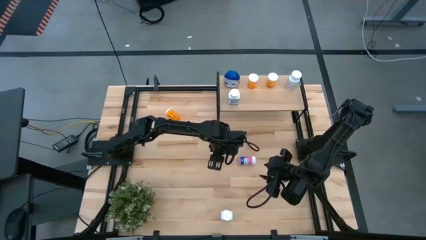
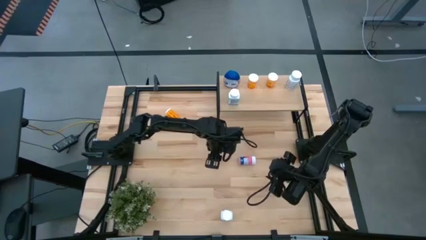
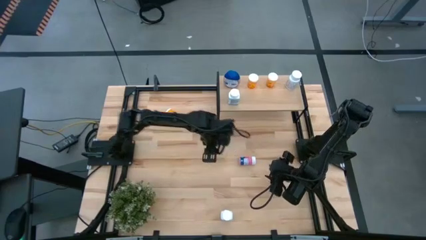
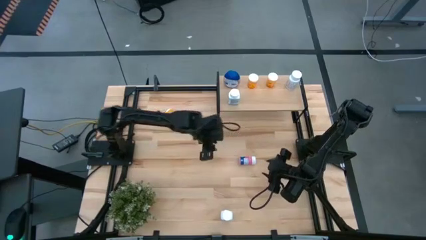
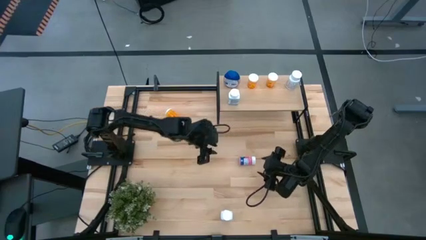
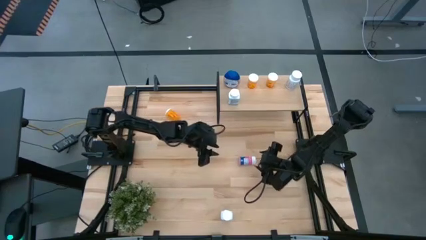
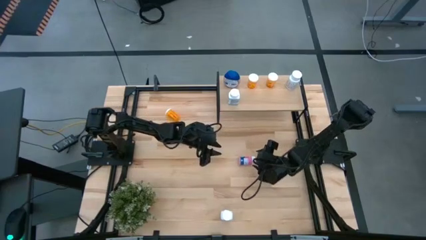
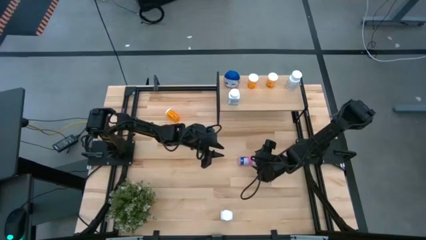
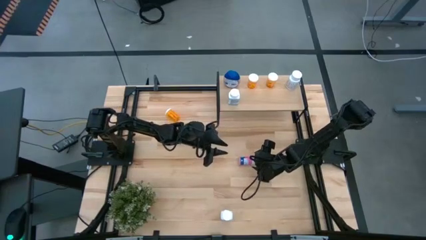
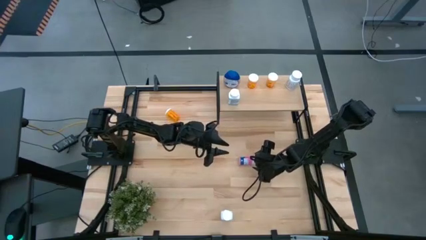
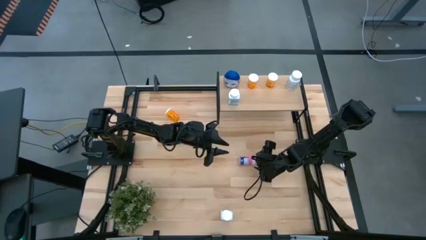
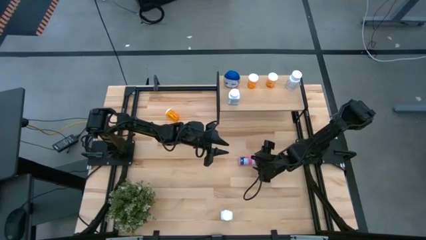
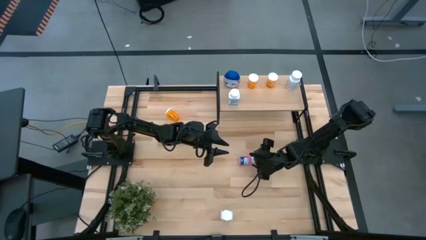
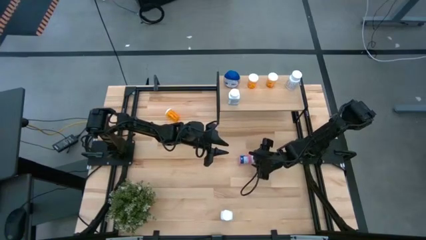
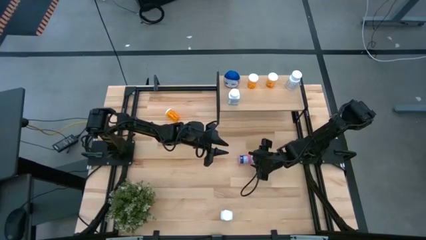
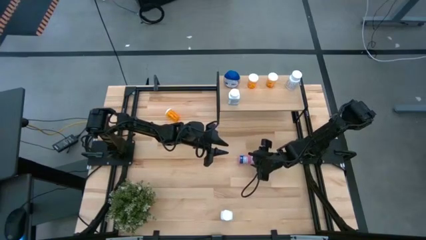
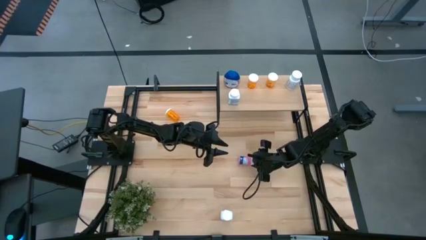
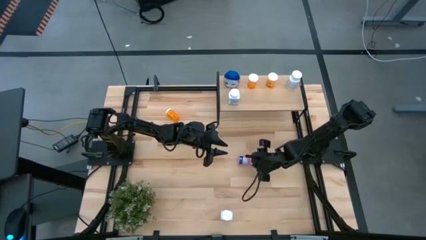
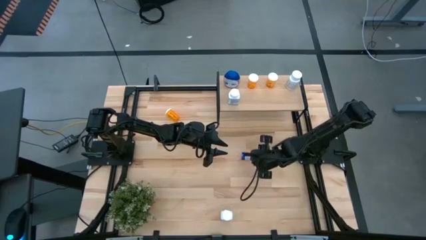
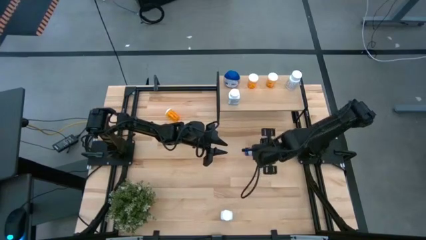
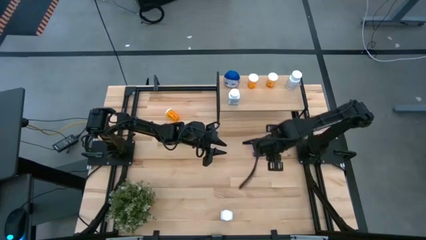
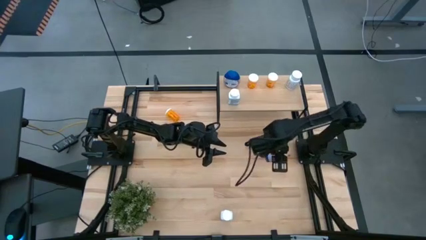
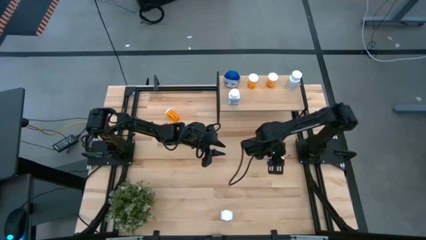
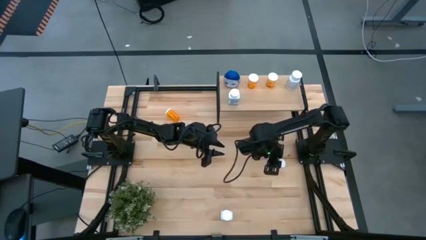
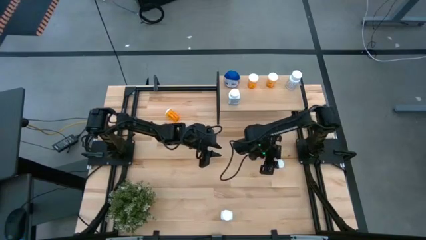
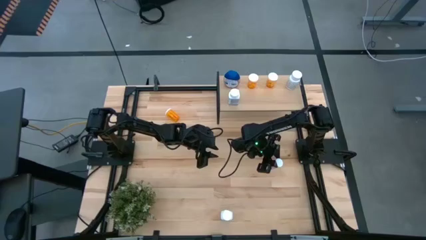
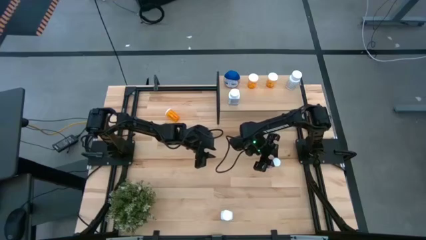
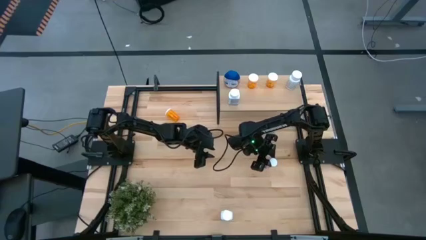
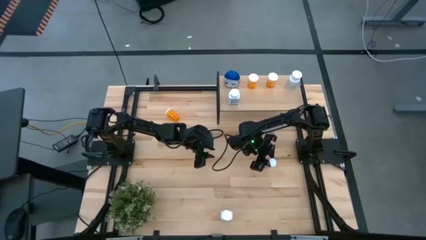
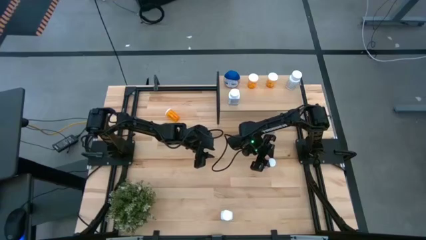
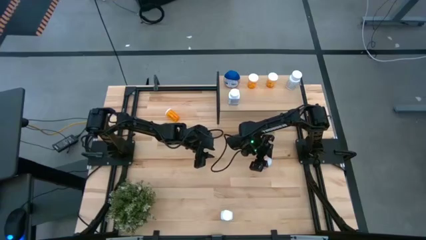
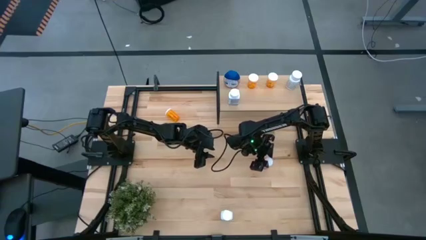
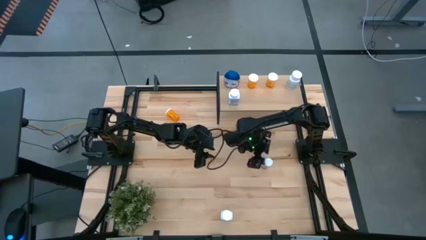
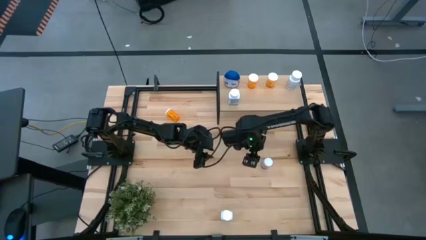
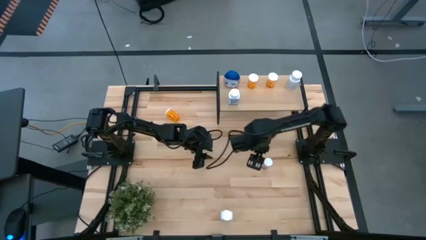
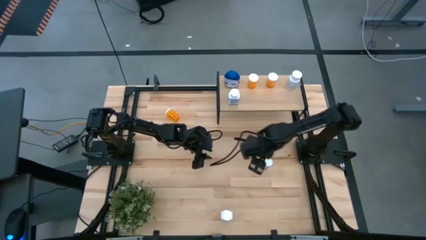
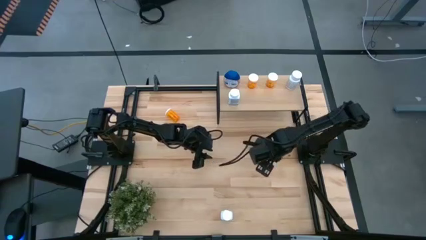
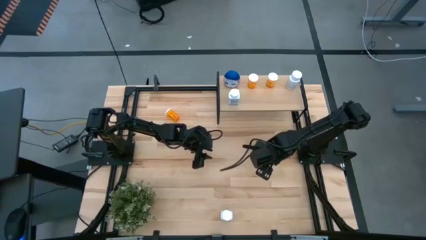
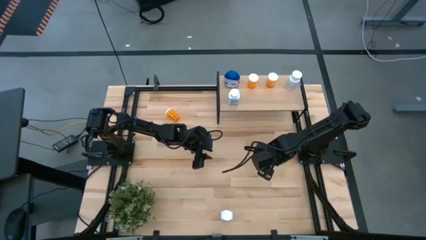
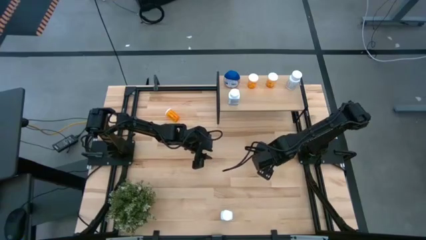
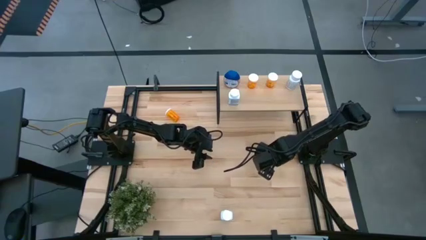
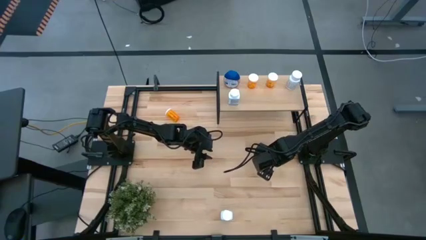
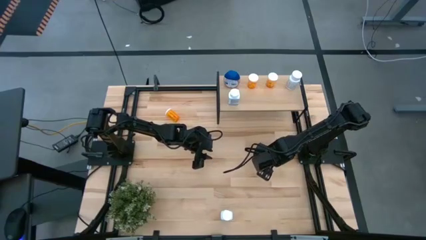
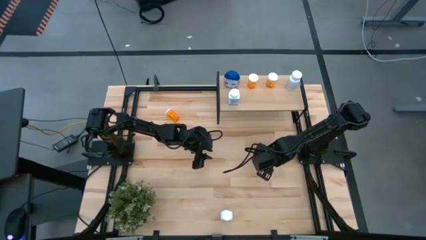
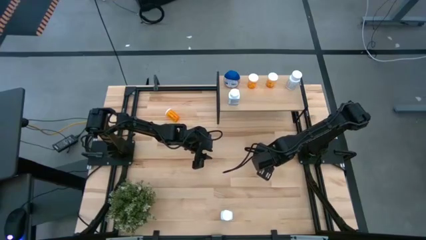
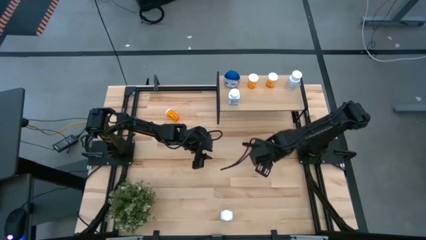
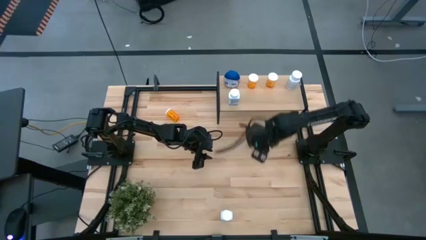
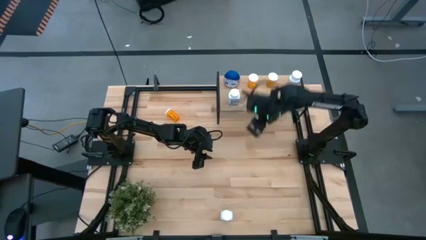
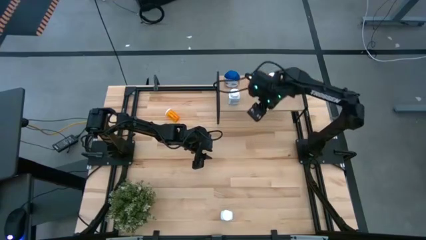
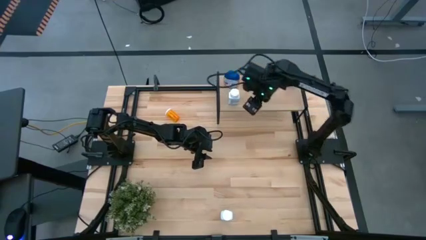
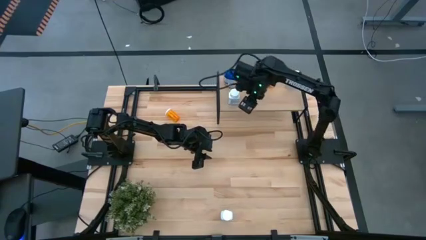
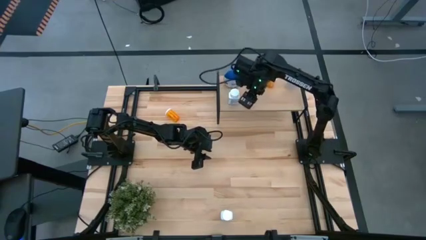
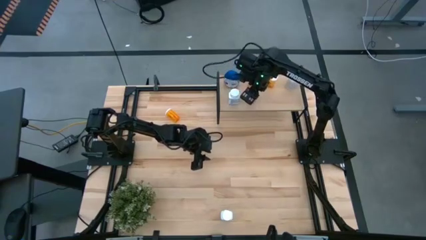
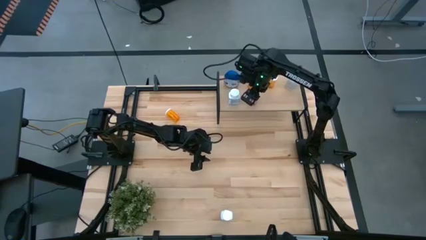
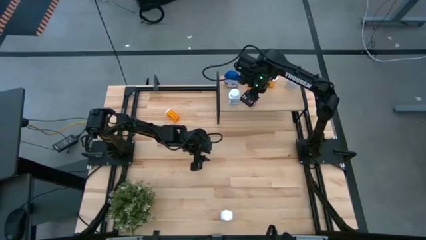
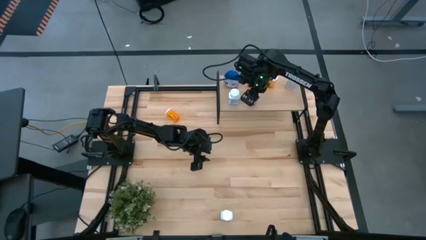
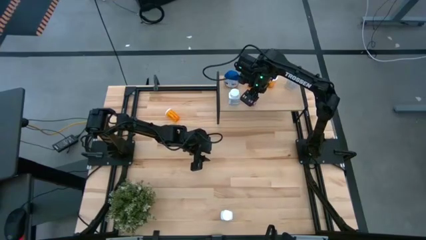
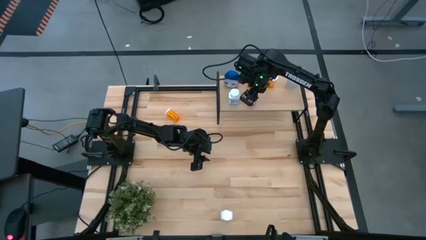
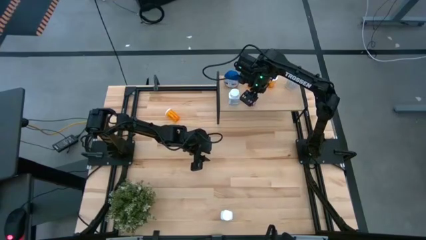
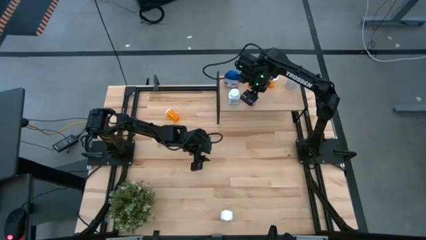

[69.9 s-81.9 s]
Task: Pick and place medicine bottles onto shelf by color
Put the pink pill bottle on the shelf

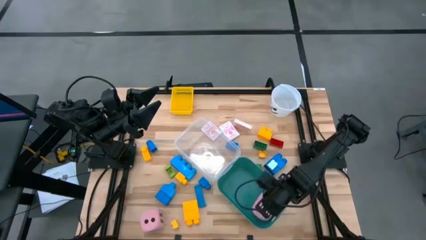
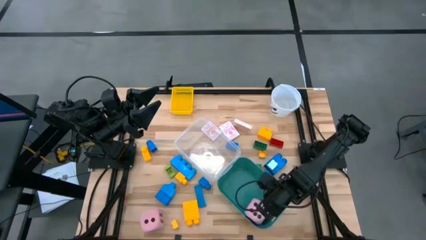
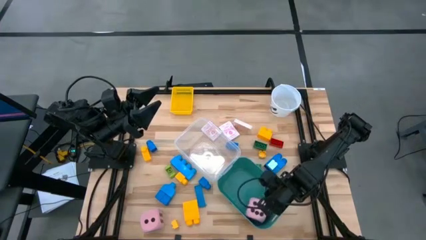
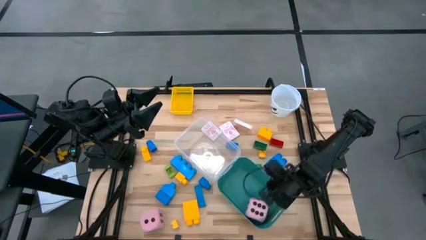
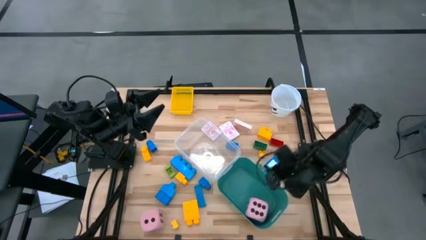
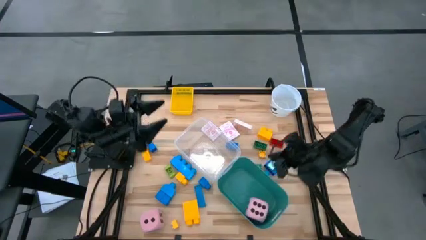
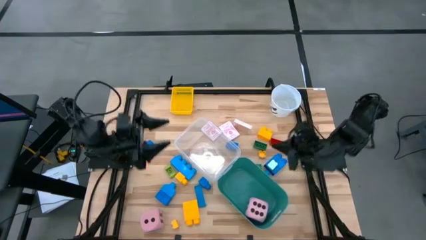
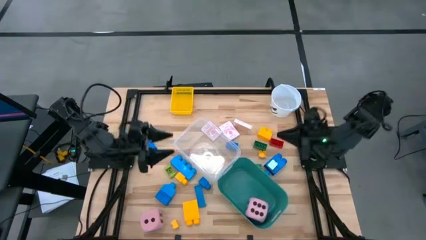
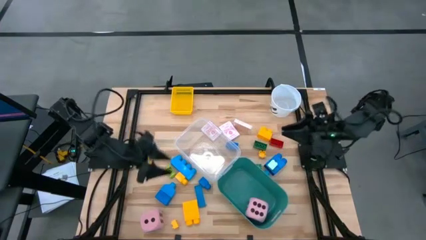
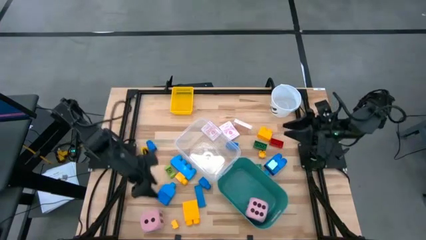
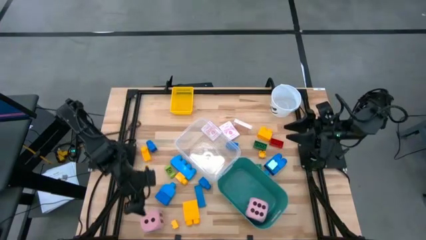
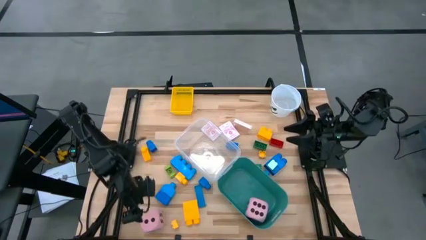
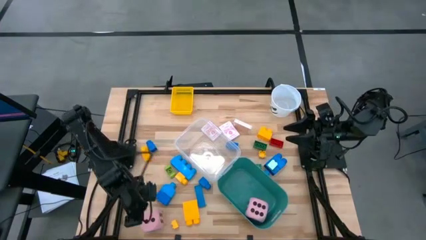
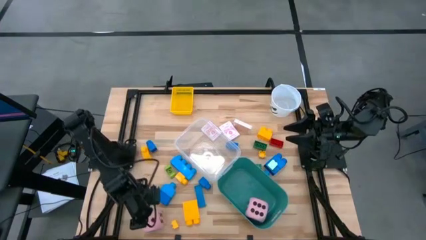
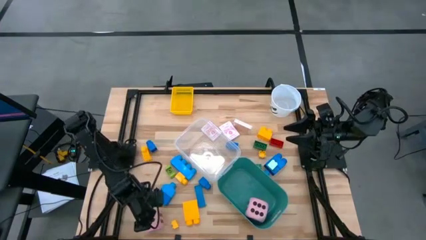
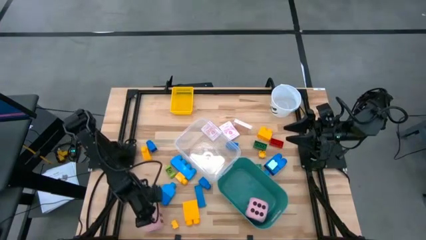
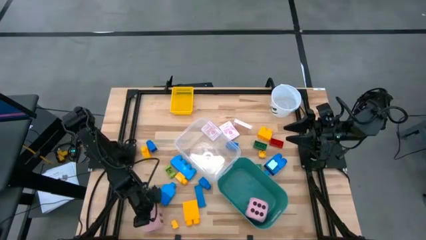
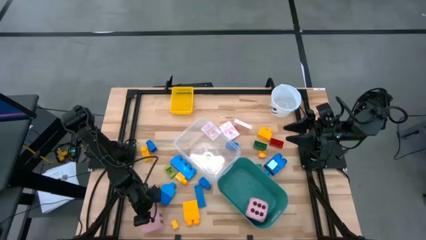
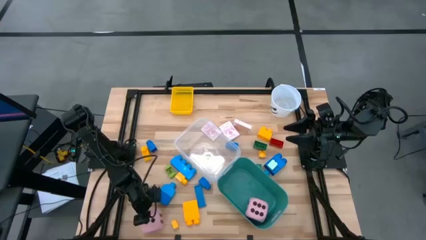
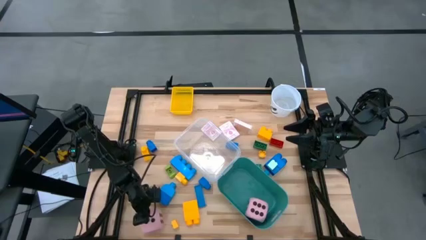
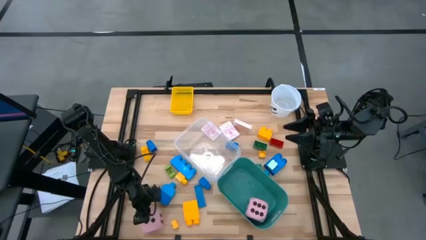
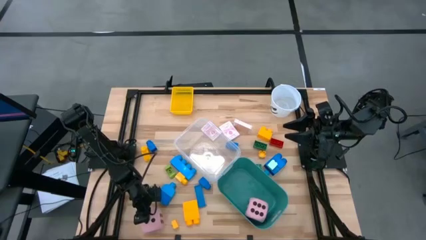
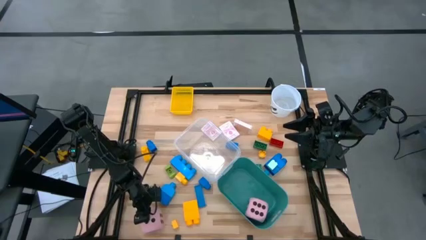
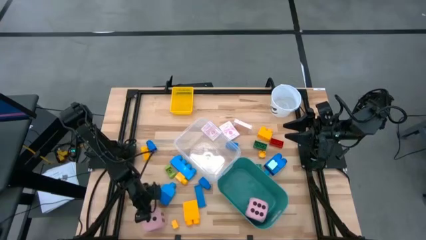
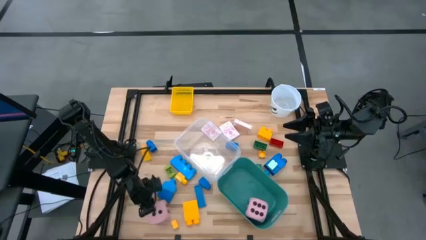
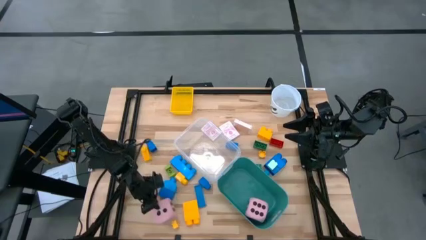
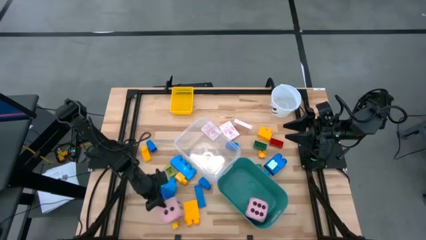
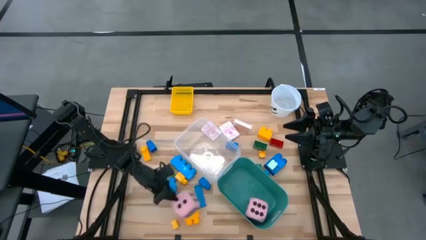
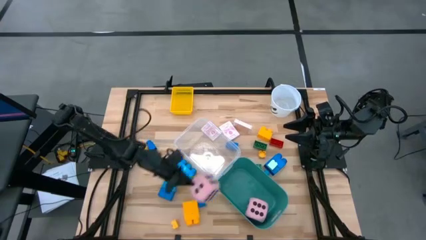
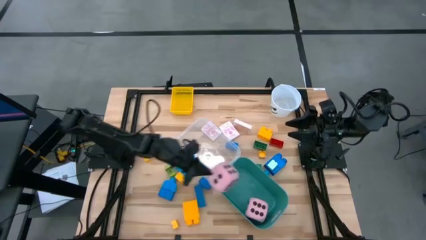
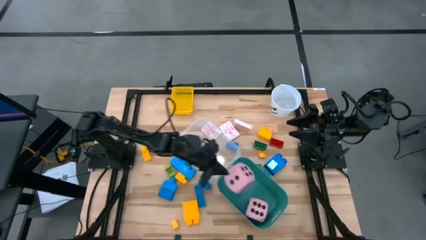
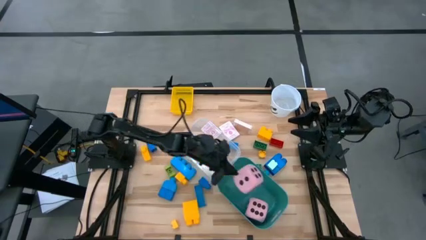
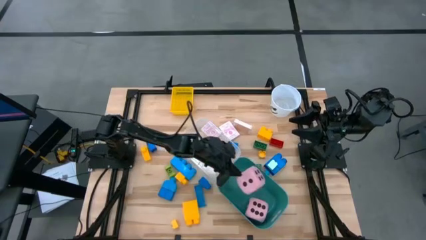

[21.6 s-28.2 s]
Task: Pick & Place Toys
Put the pink die into the green bin
